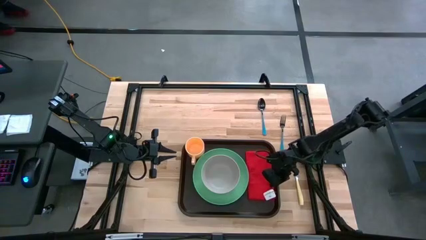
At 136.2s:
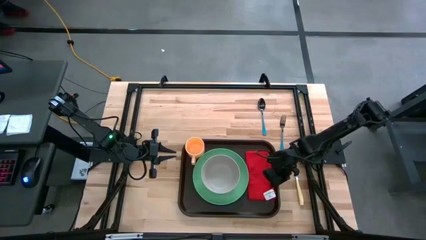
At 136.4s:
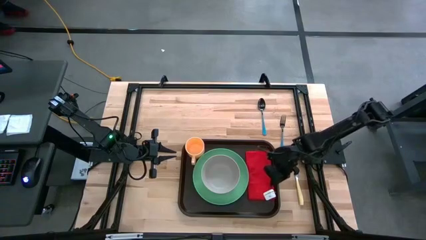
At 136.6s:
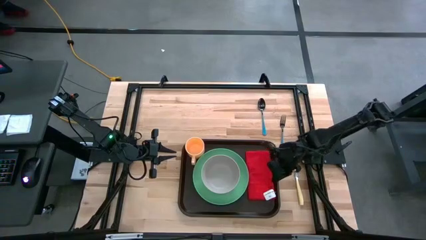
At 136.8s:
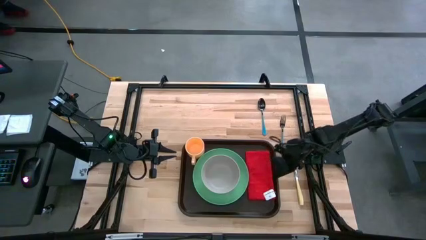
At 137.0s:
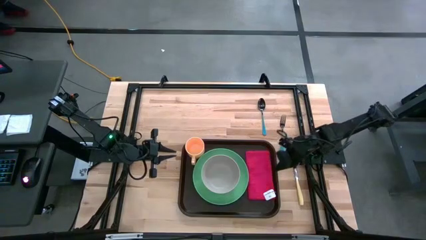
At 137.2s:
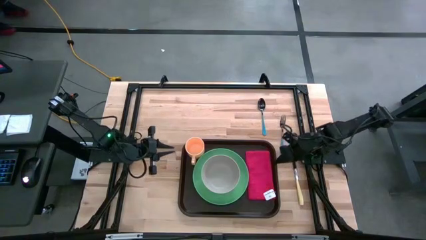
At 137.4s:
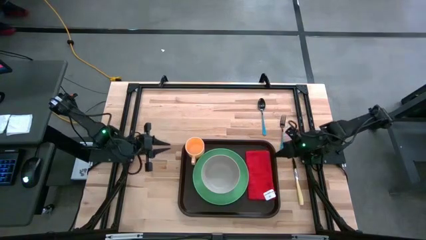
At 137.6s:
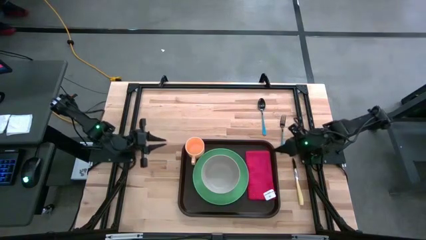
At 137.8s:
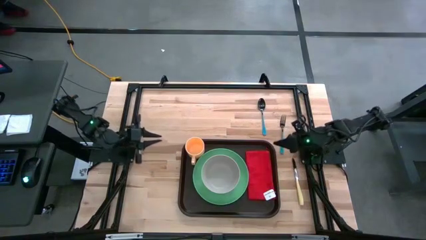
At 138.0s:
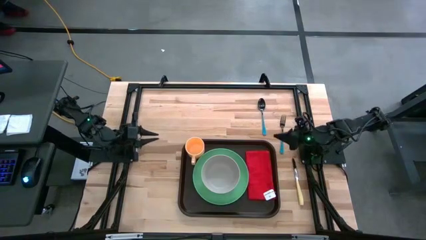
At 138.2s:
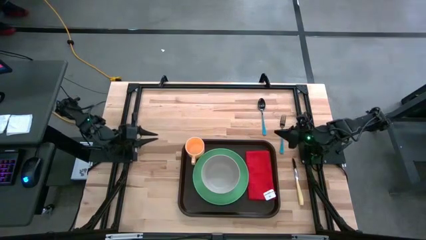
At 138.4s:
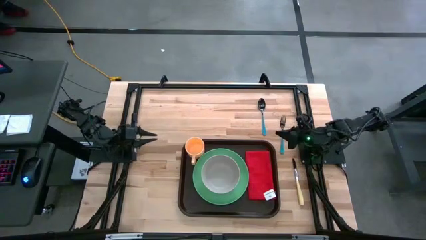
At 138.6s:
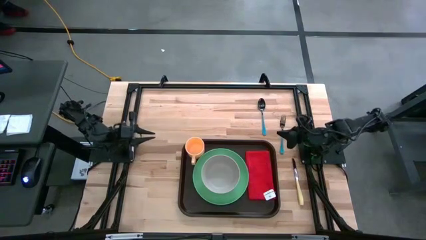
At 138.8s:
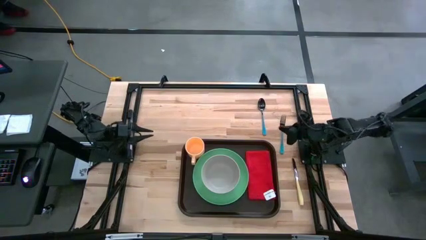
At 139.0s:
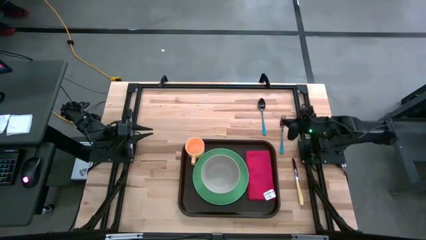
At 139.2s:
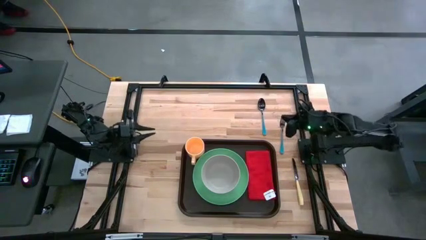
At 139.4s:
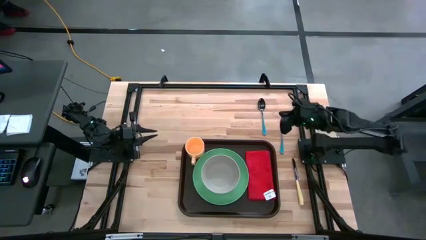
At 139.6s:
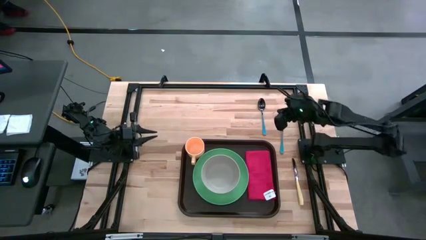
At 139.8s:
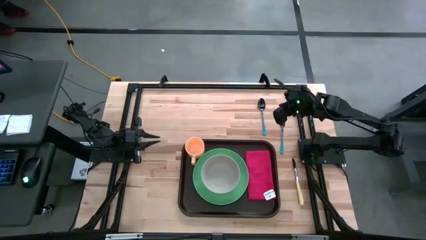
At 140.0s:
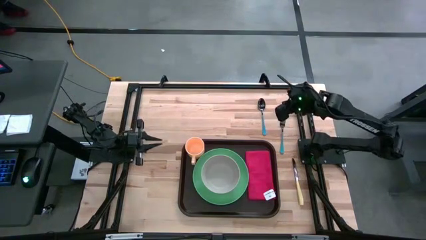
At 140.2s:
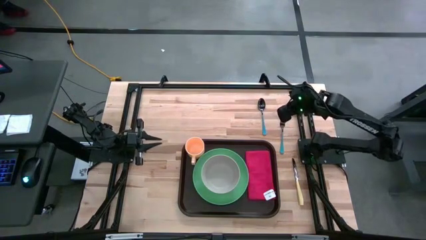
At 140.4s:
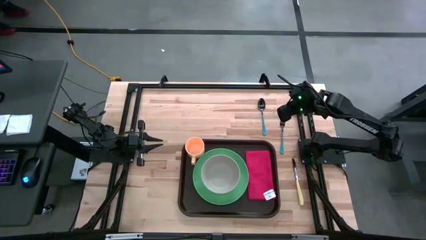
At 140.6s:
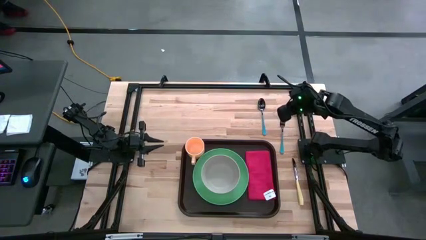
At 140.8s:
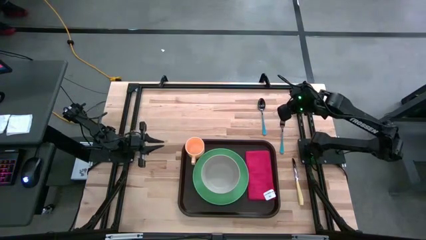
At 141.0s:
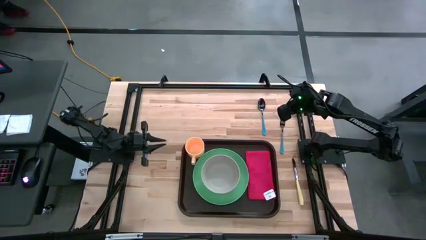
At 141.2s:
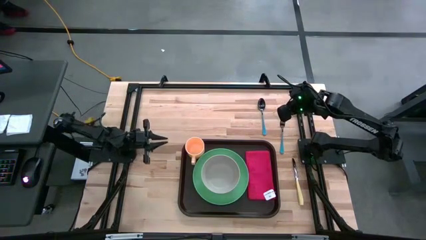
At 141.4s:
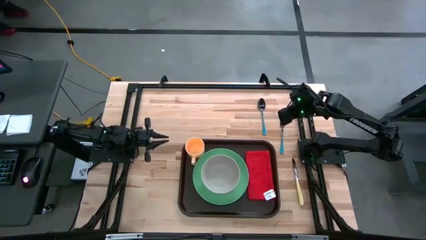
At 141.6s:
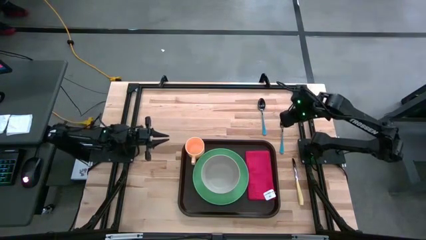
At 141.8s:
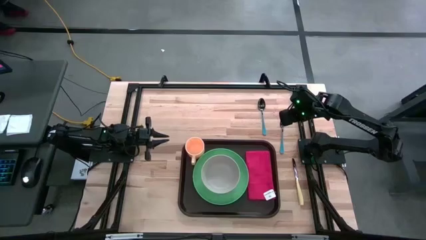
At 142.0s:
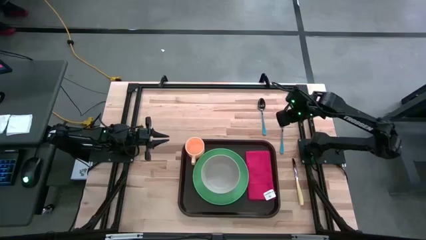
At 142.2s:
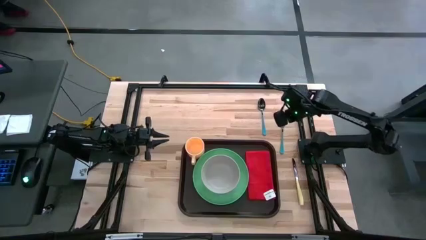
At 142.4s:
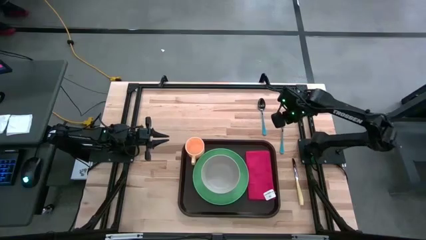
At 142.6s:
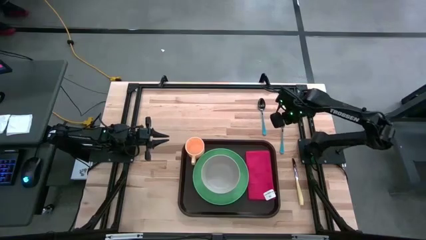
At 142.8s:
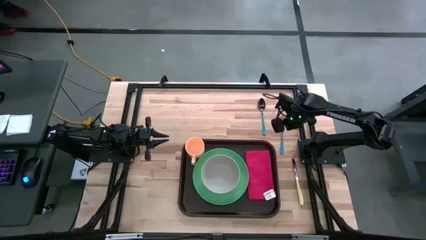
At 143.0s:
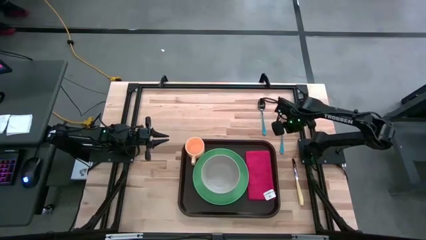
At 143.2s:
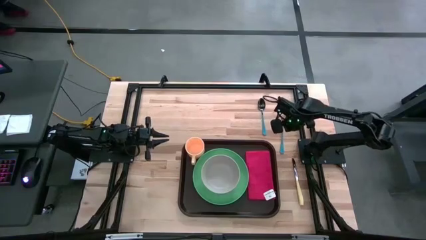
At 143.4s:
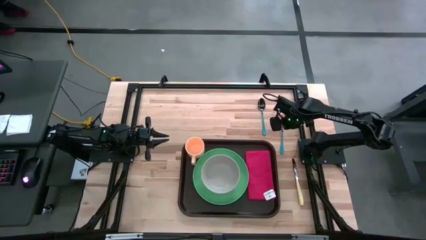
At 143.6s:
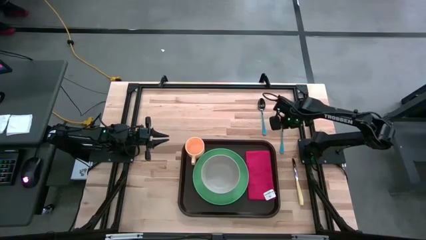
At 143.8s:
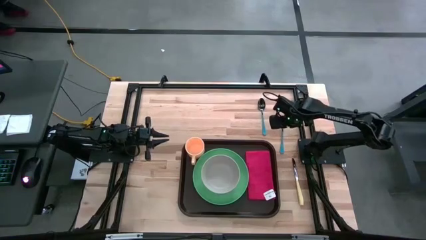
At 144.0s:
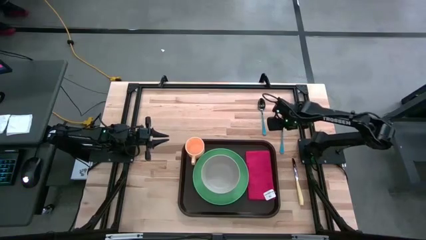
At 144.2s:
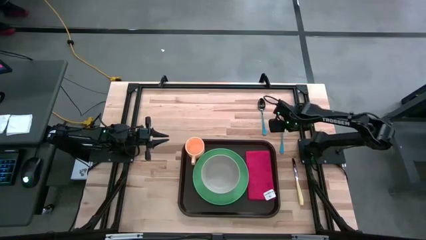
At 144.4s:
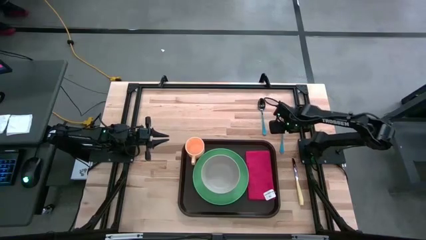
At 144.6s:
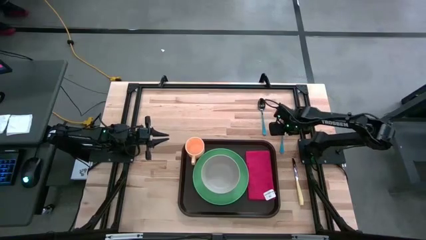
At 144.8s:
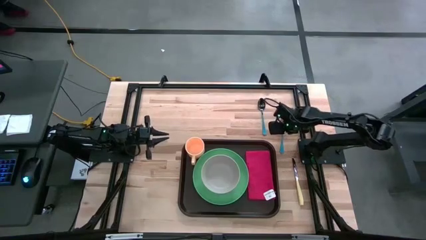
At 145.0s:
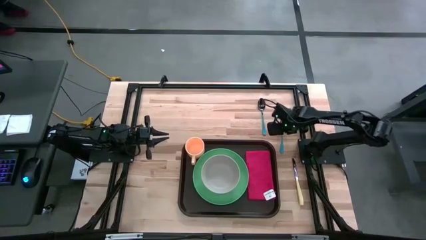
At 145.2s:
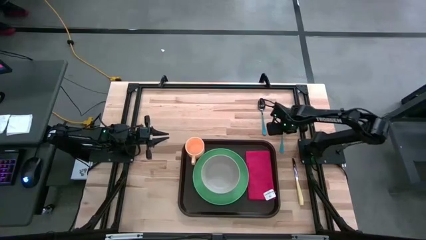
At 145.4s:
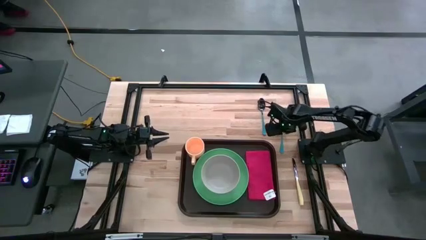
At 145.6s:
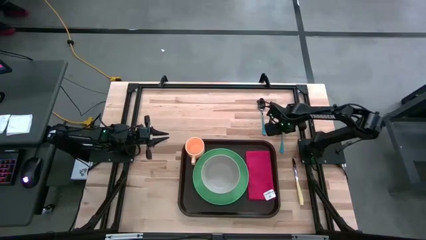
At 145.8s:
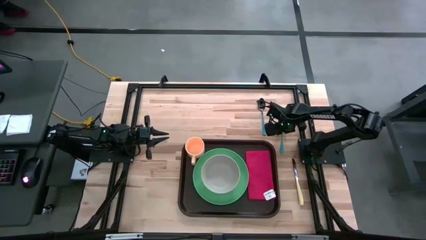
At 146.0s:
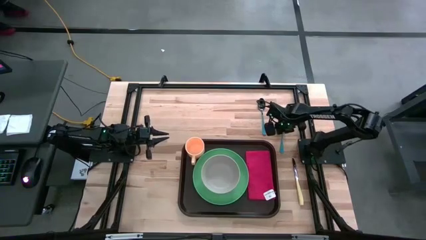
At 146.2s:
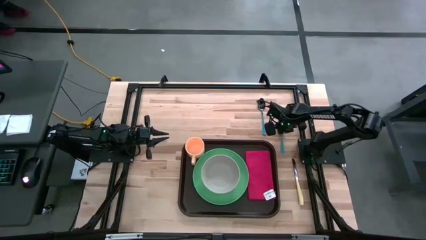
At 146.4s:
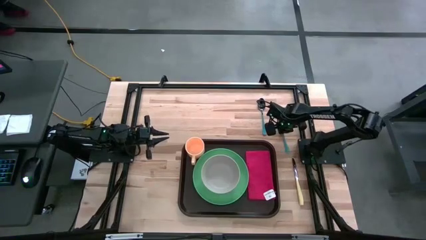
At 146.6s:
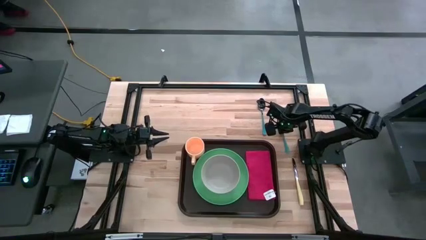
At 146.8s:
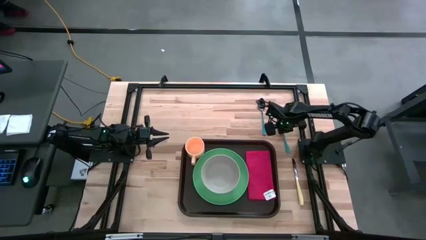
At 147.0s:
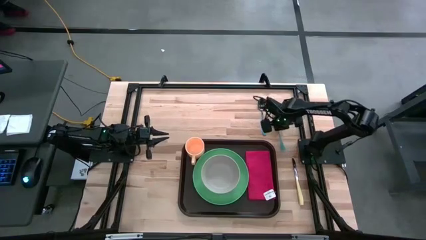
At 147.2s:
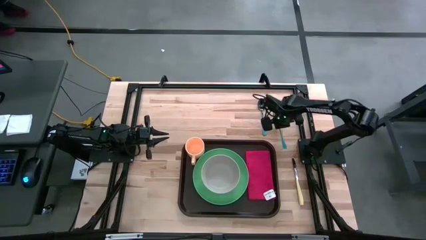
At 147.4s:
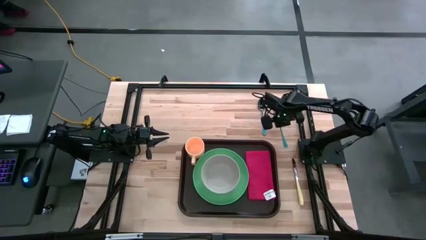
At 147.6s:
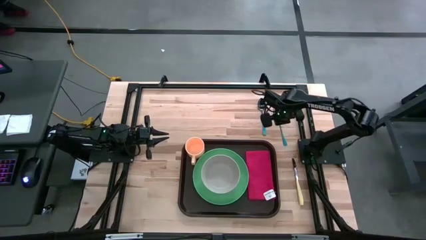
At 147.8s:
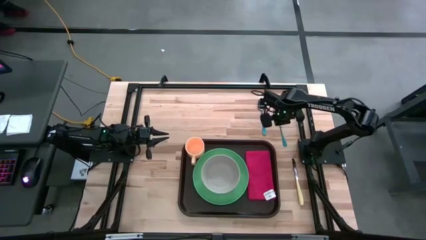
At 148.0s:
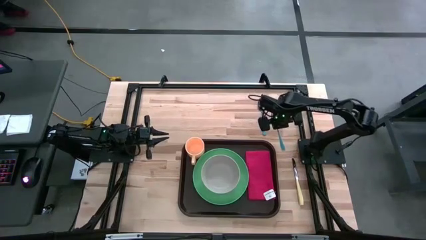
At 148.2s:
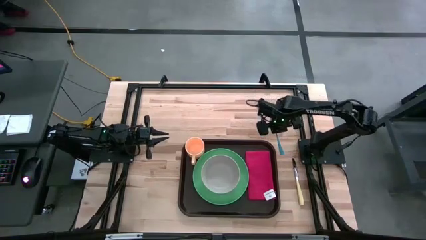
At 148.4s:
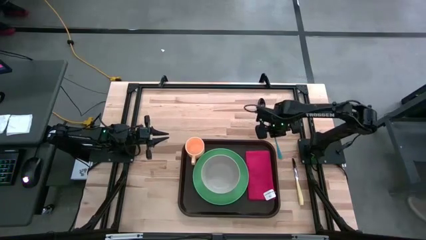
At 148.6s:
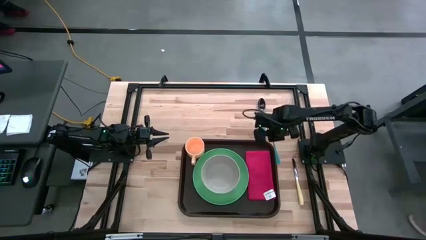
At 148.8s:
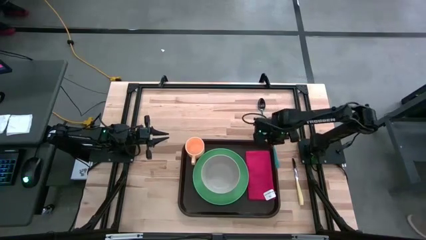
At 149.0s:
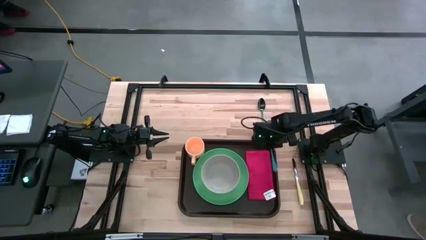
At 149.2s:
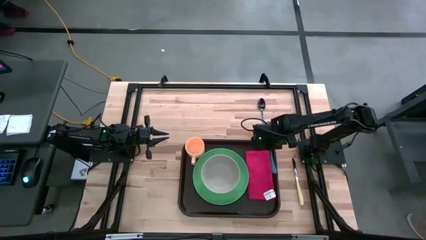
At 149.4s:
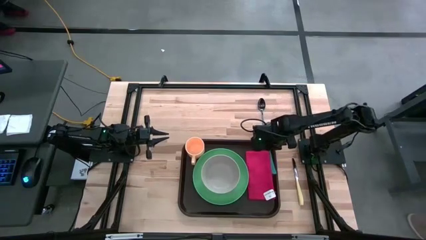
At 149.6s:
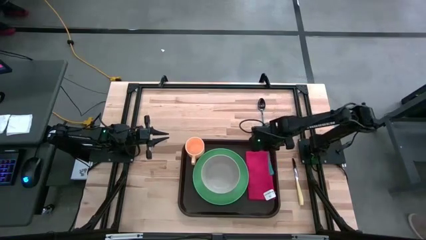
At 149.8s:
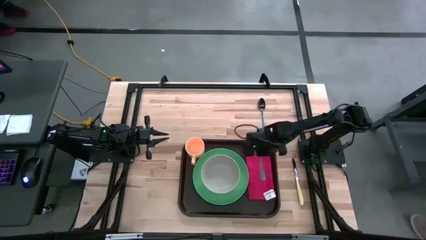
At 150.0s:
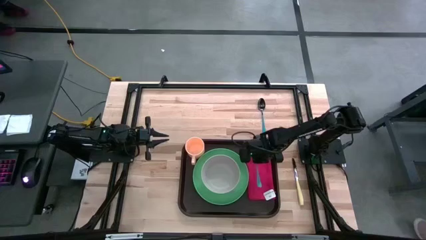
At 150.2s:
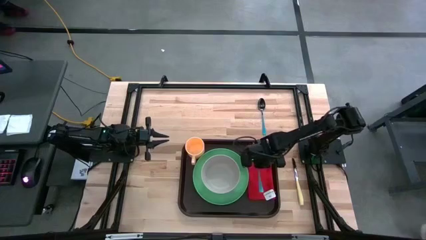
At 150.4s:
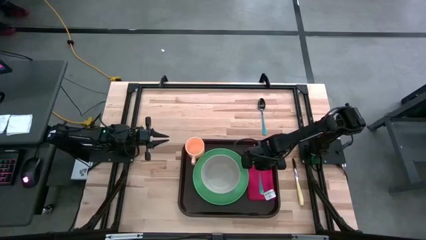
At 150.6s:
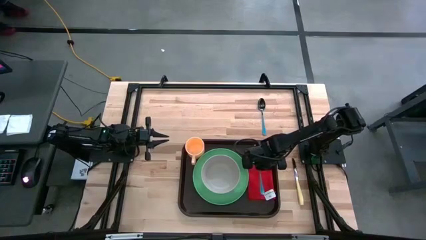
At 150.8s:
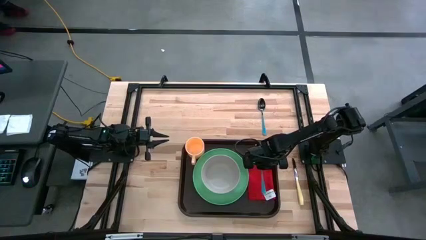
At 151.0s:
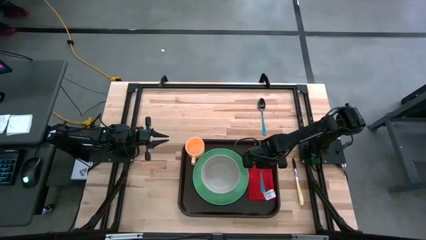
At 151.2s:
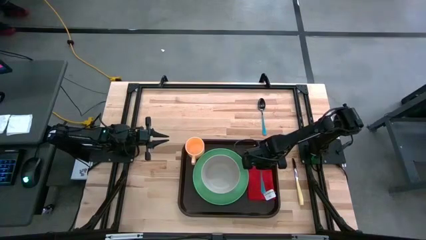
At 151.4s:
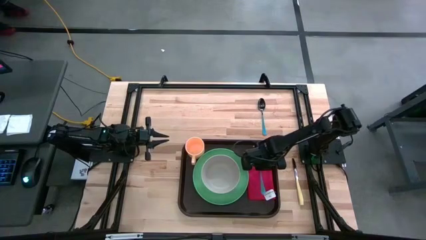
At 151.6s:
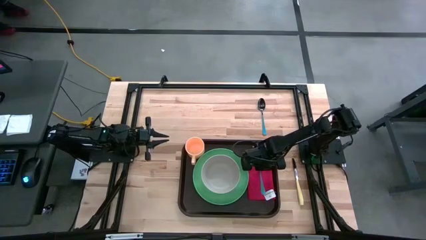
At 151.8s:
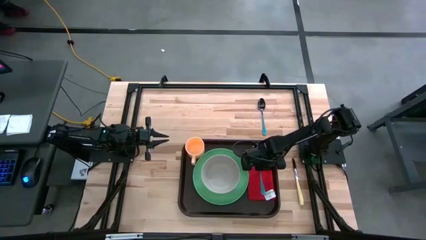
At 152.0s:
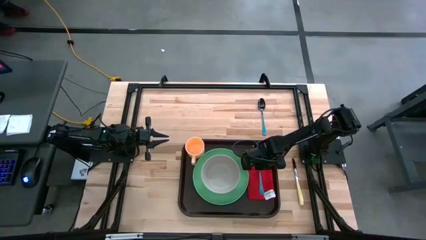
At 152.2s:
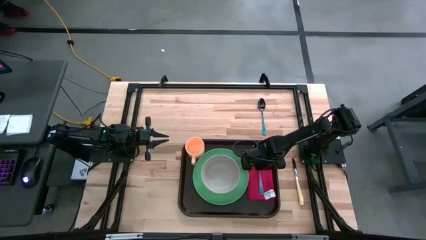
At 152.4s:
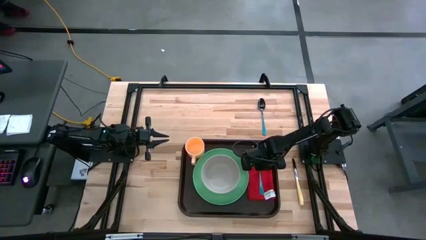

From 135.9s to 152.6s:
Task: Set up tray
Put the blue fork on top of the red table napkin
